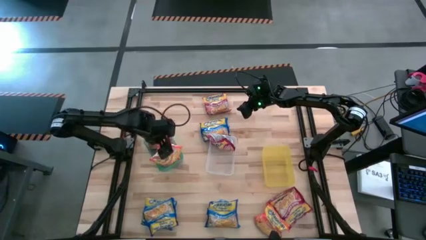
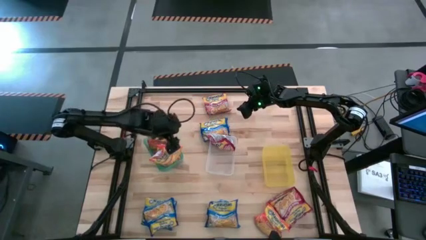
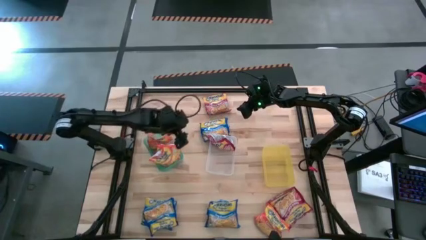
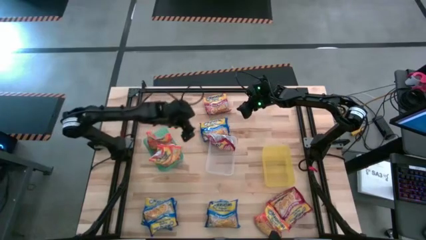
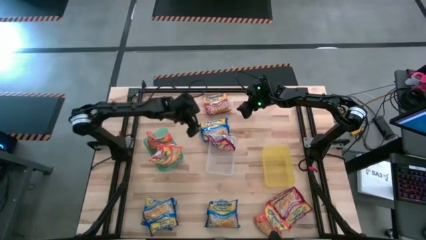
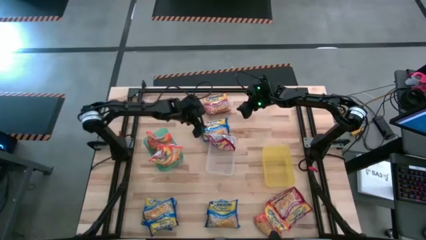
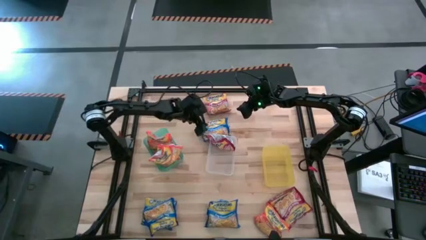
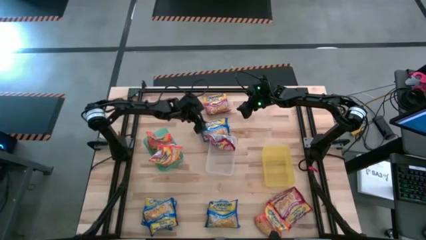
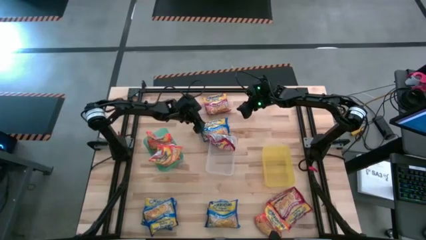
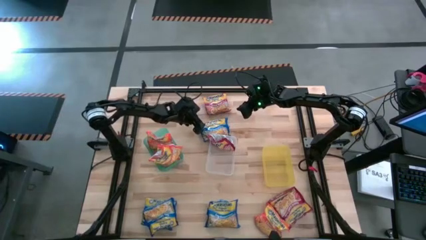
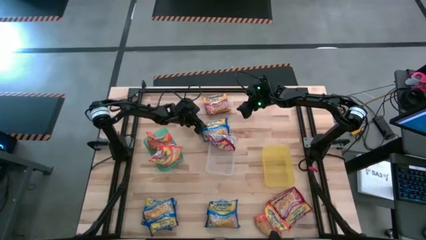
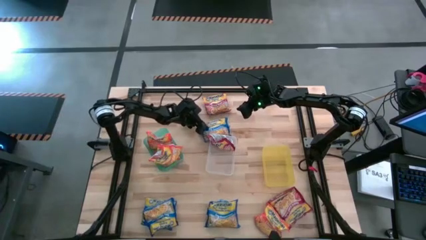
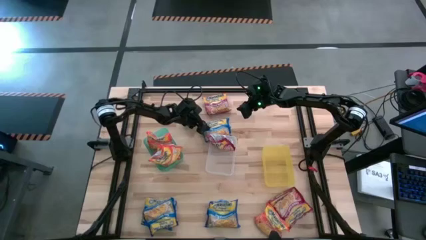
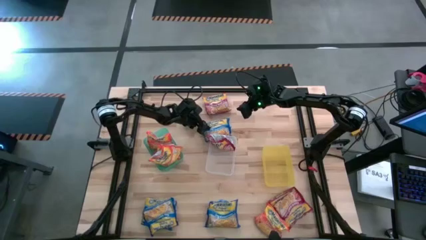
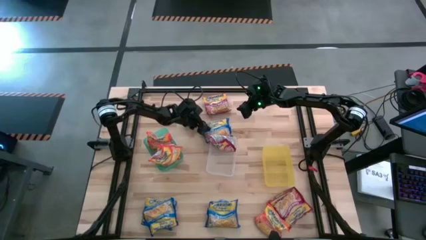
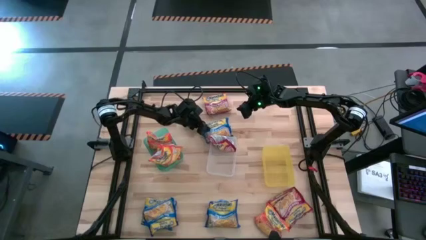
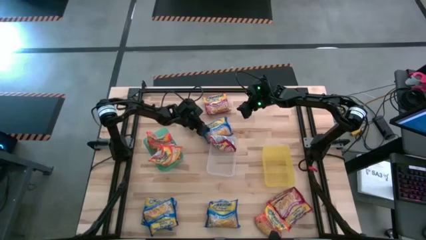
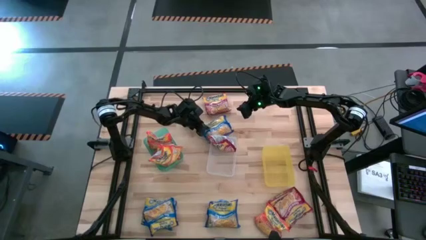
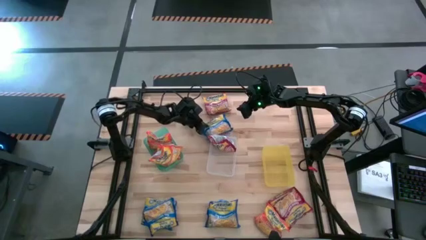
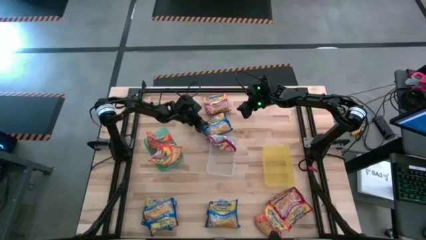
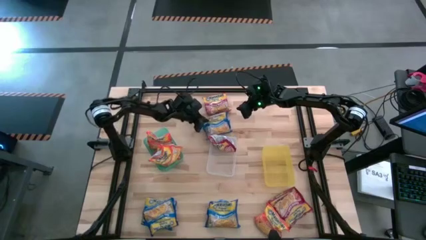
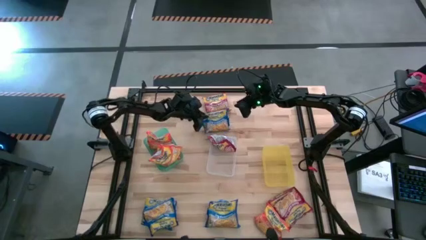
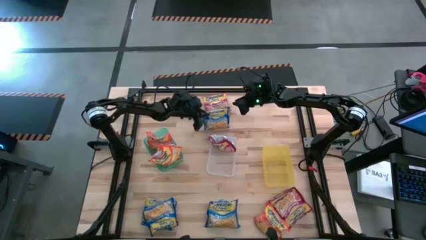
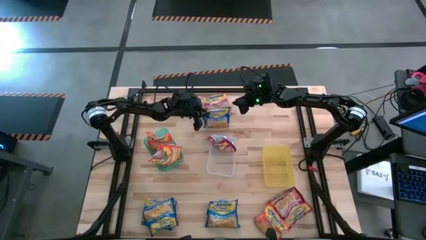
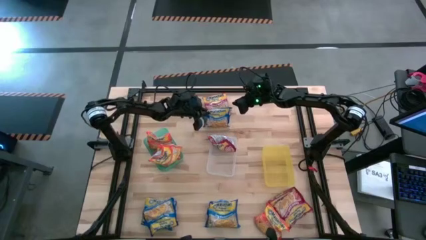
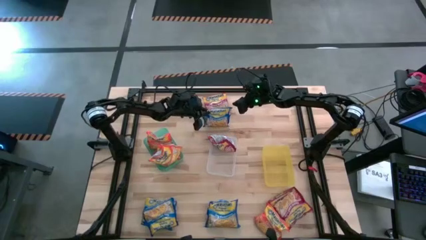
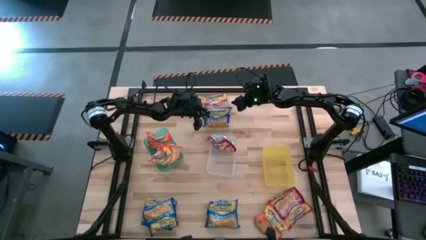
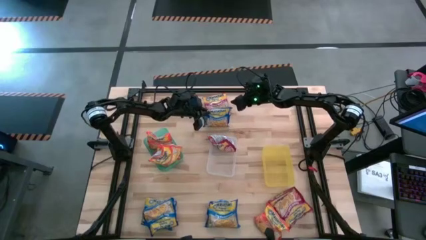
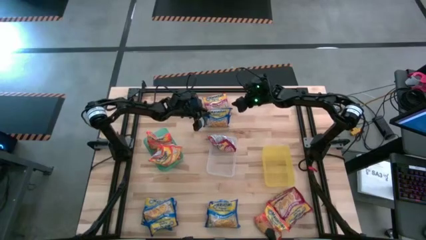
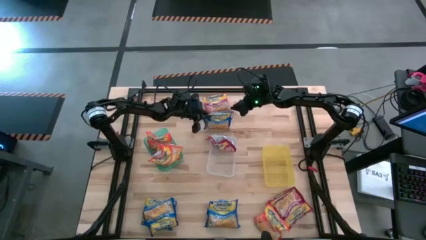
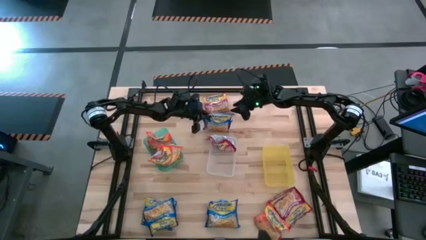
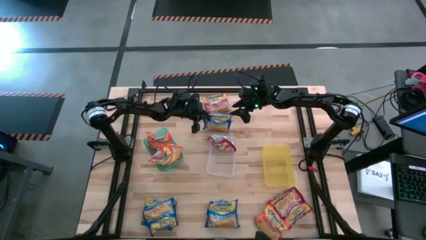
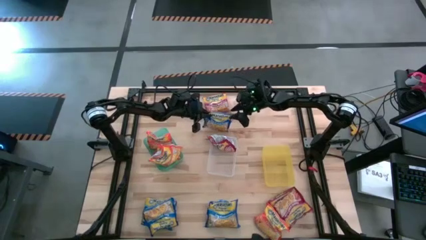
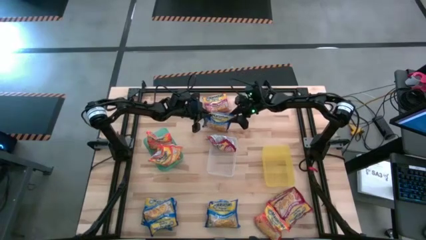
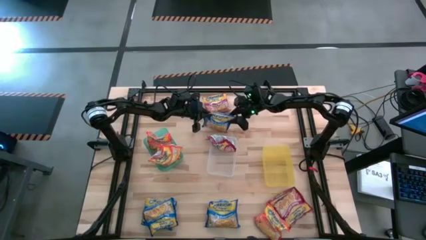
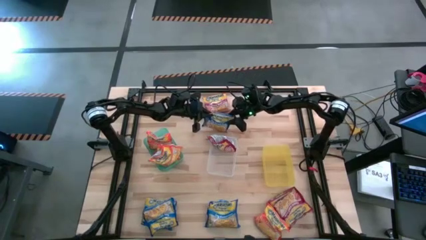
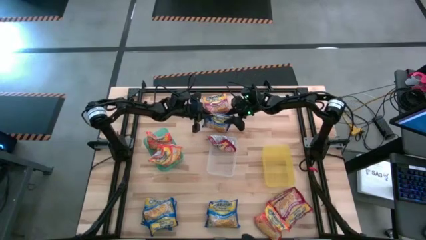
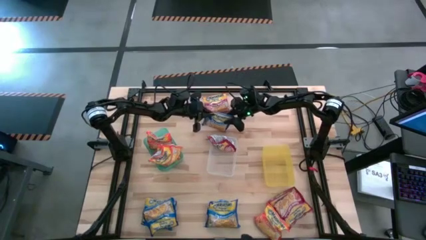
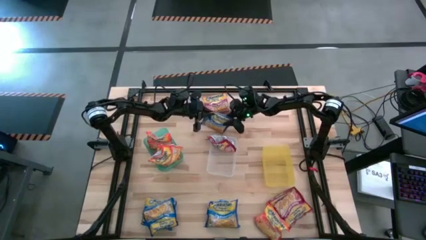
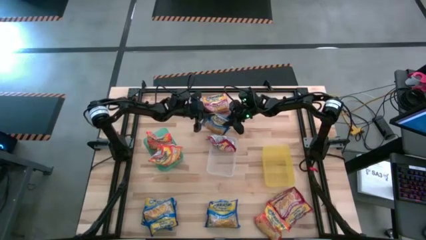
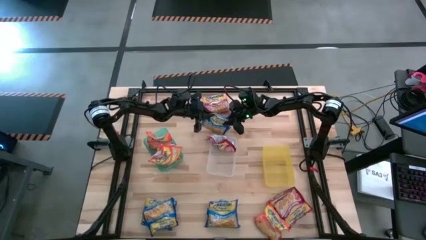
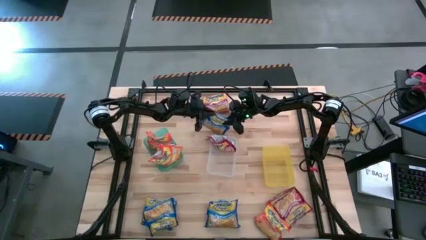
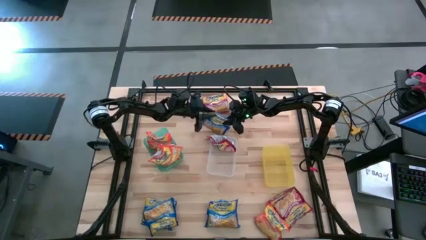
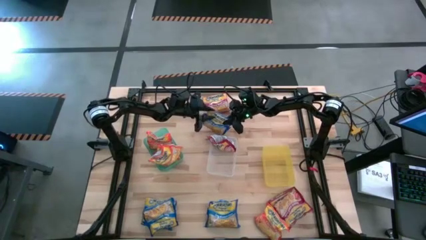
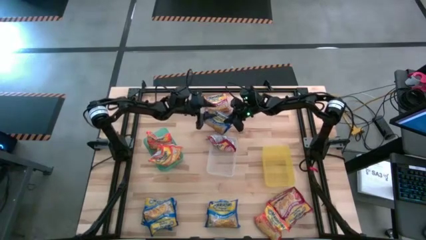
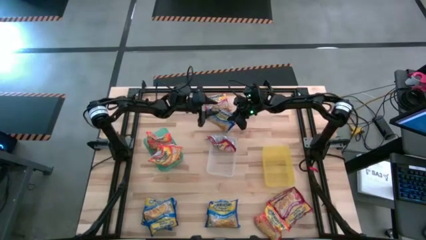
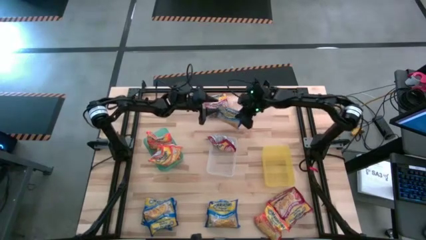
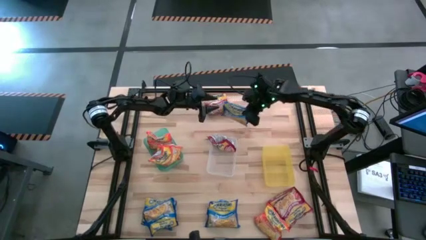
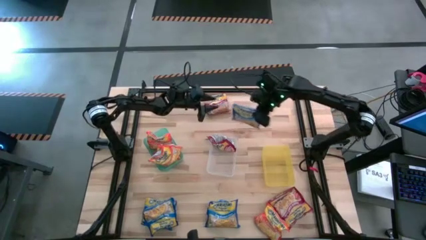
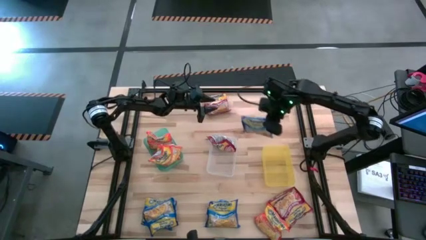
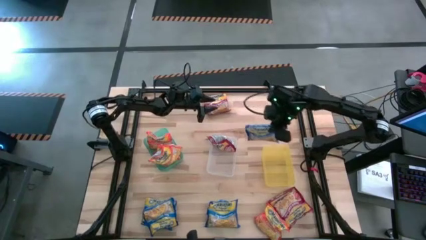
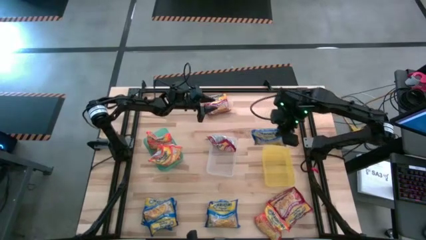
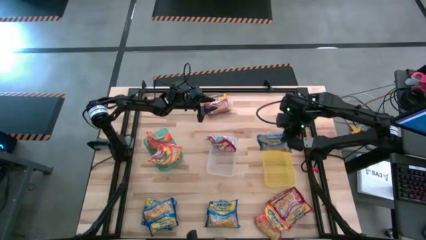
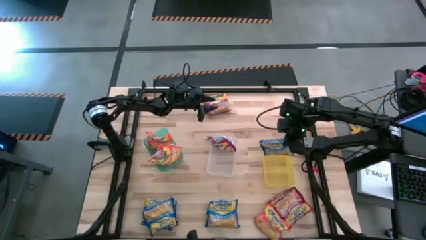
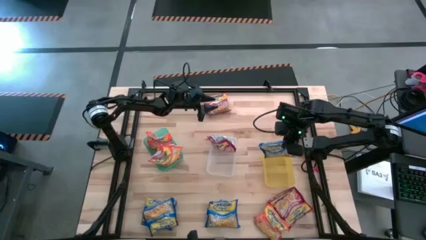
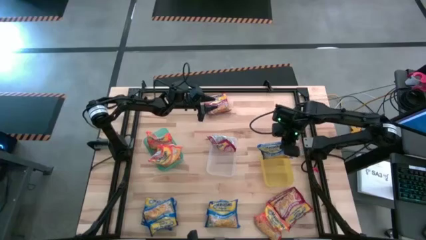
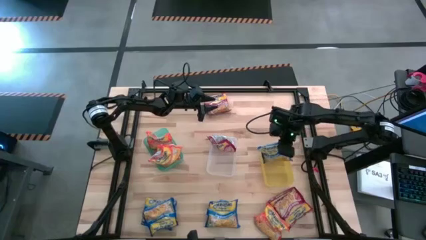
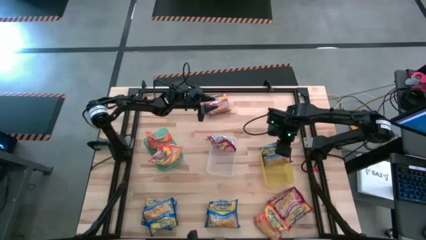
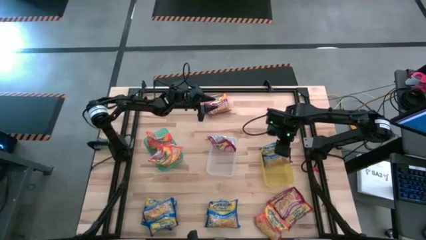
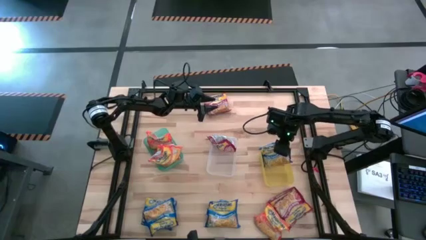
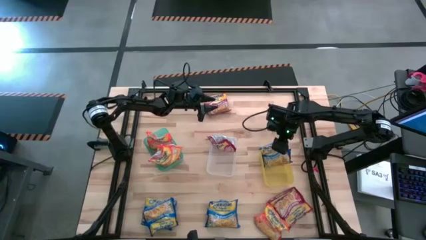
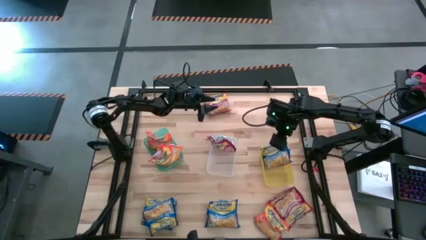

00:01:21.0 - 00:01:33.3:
Task: Sort Maruchan noodles
Put the blue noodle pack into the yellow bin

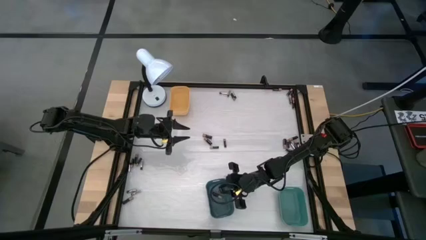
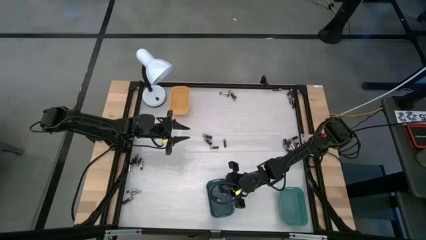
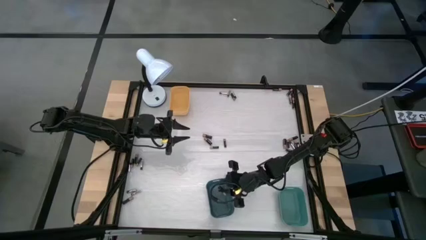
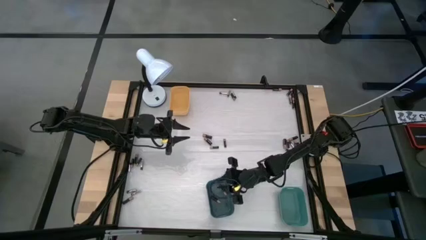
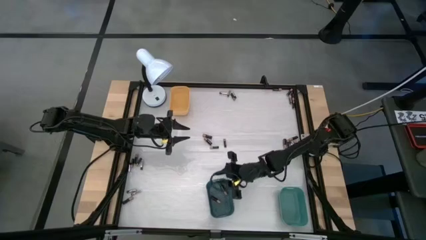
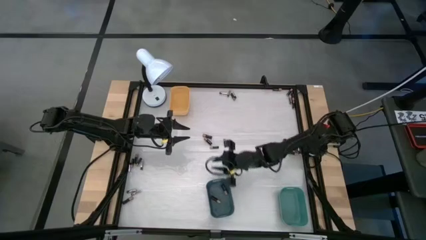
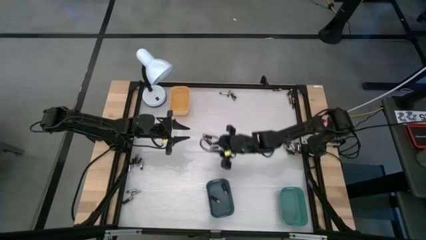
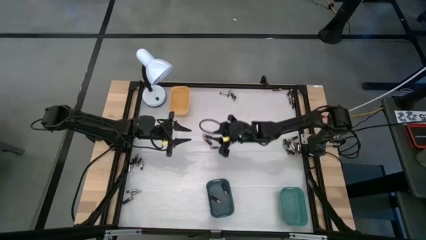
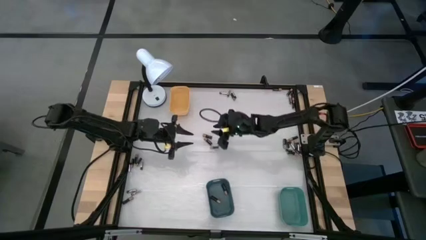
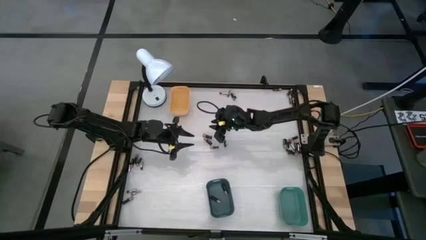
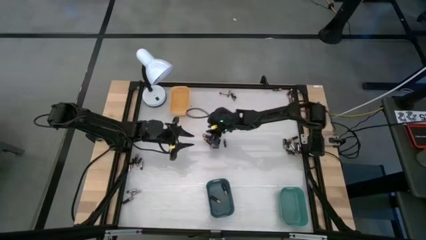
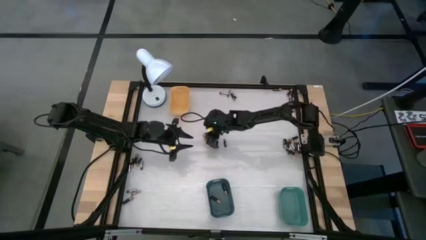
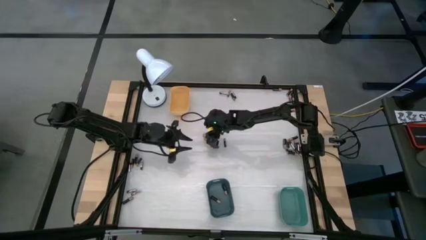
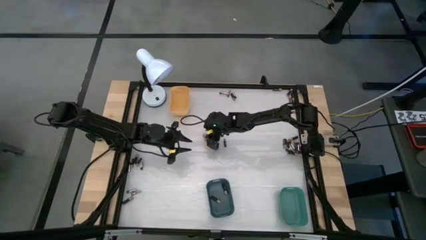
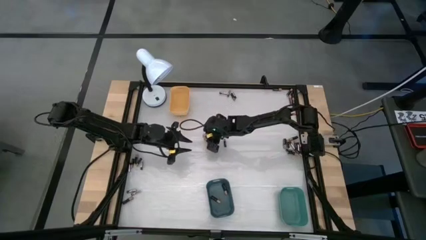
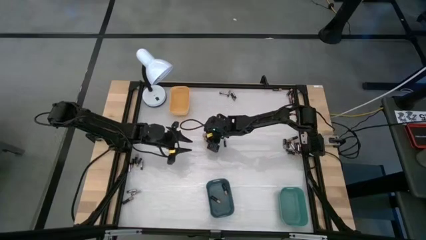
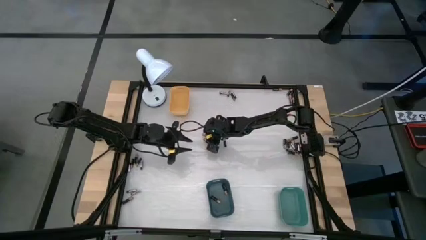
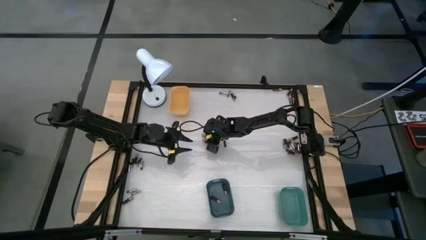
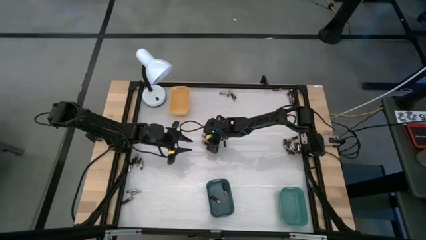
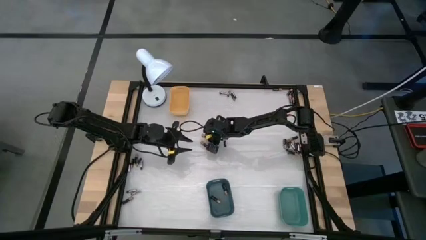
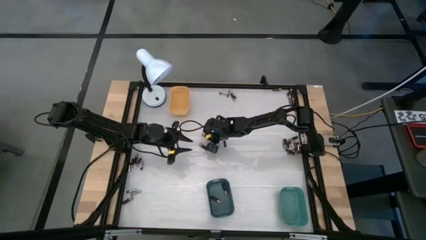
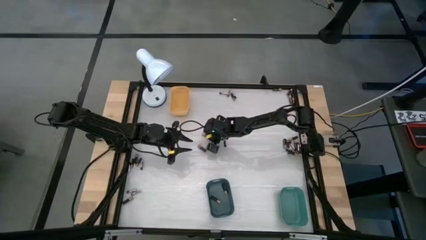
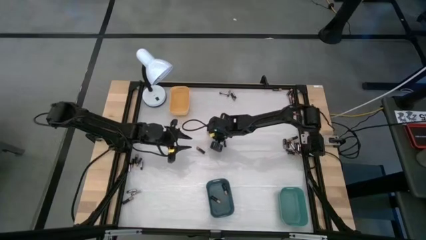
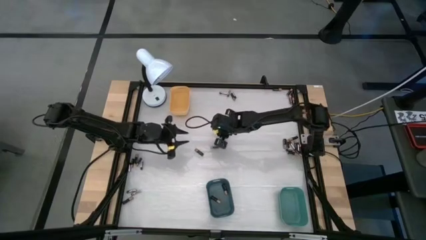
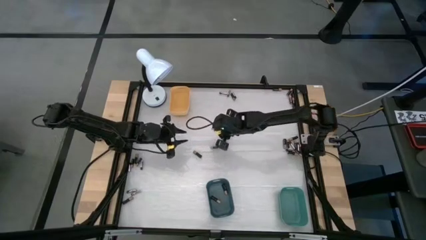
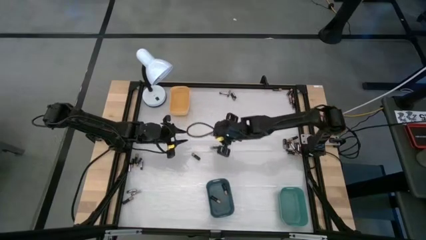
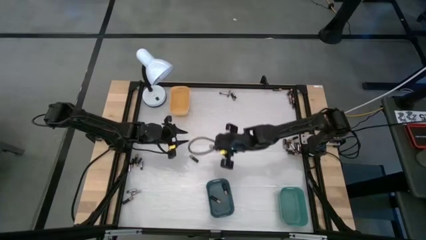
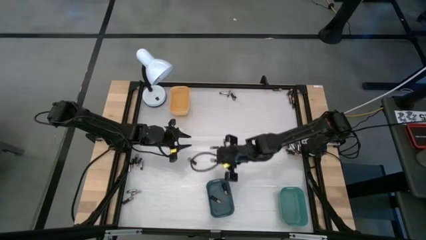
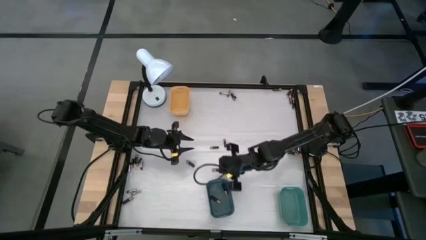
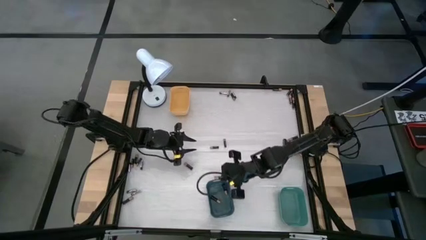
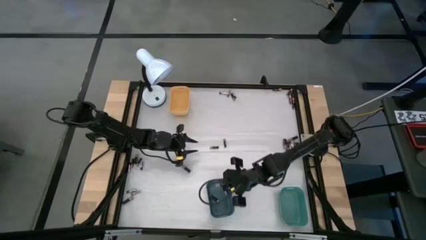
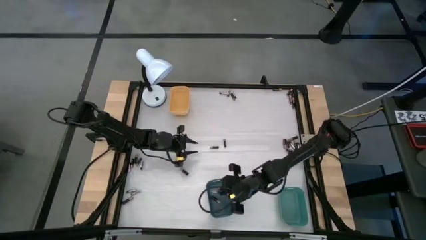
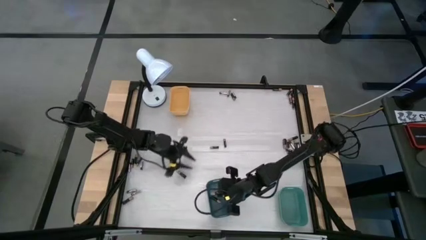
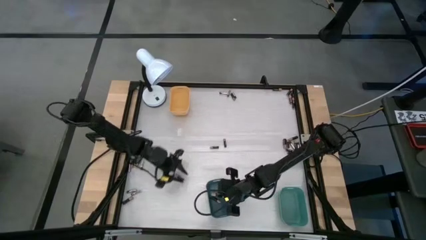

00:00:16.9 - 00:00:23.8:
Task: Sort batteries
Put the black battery into the blue bin
